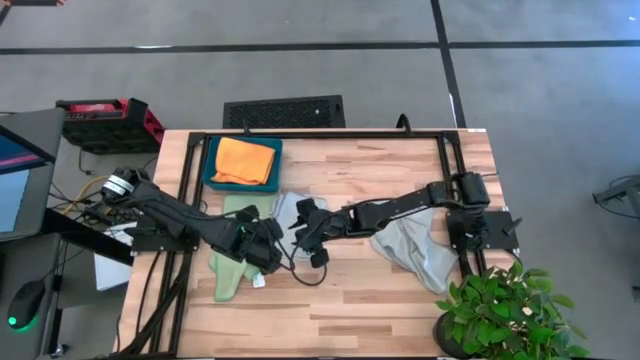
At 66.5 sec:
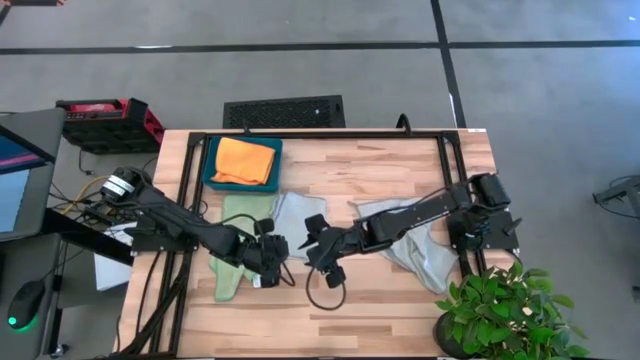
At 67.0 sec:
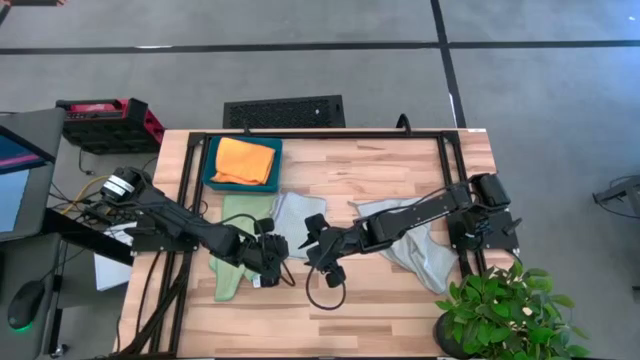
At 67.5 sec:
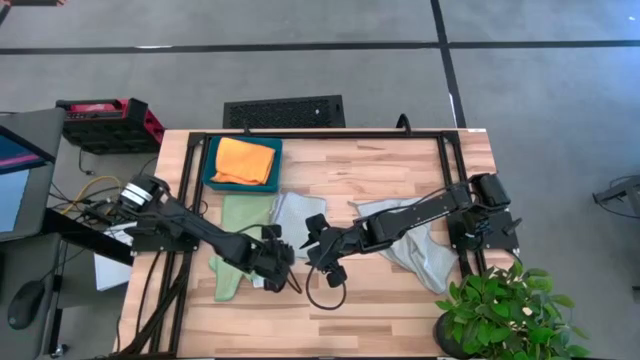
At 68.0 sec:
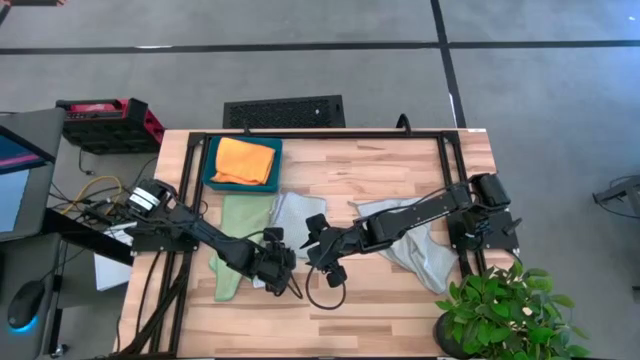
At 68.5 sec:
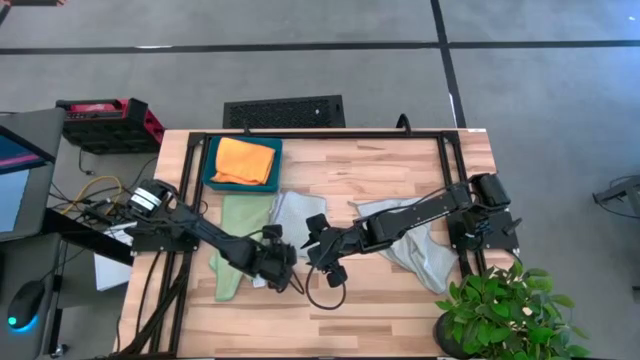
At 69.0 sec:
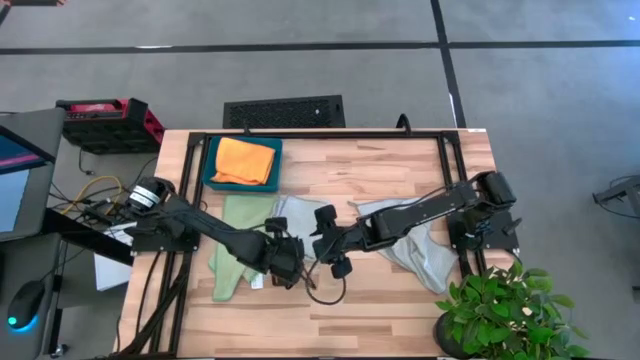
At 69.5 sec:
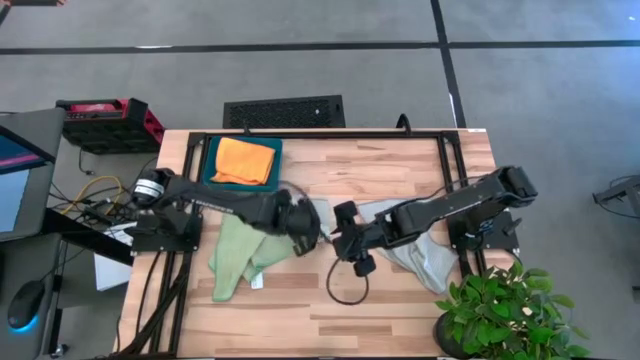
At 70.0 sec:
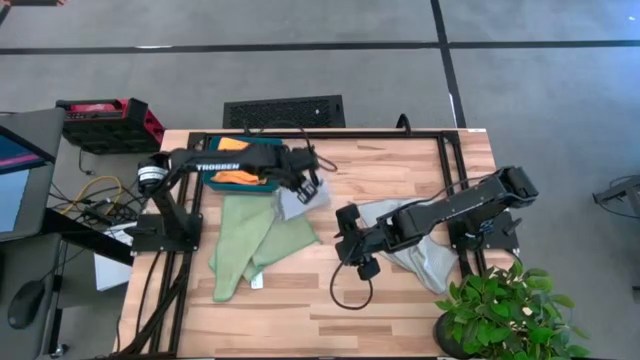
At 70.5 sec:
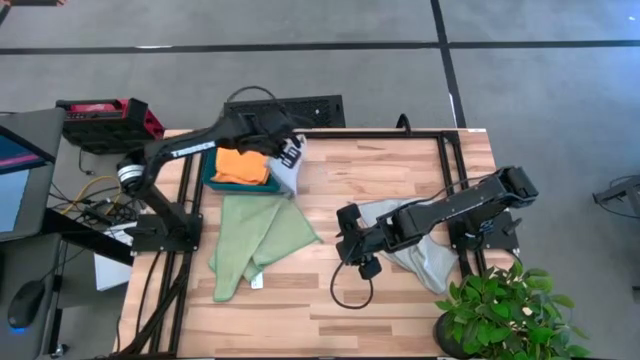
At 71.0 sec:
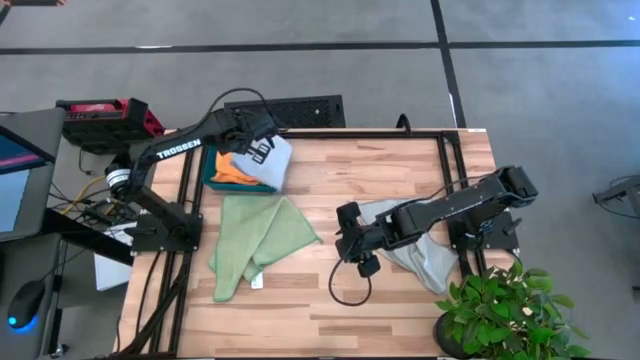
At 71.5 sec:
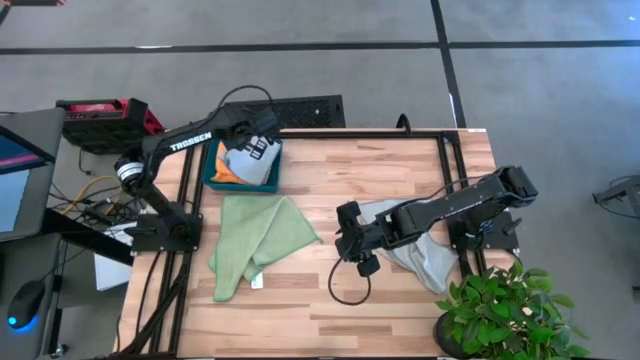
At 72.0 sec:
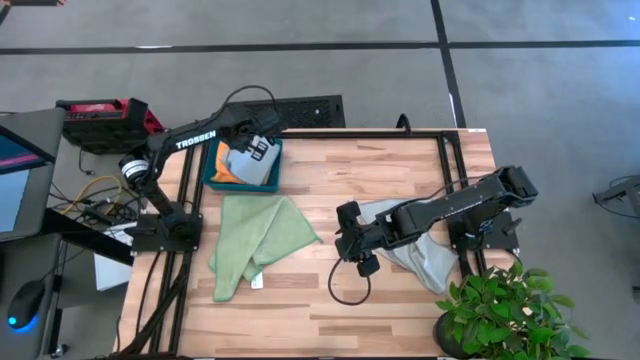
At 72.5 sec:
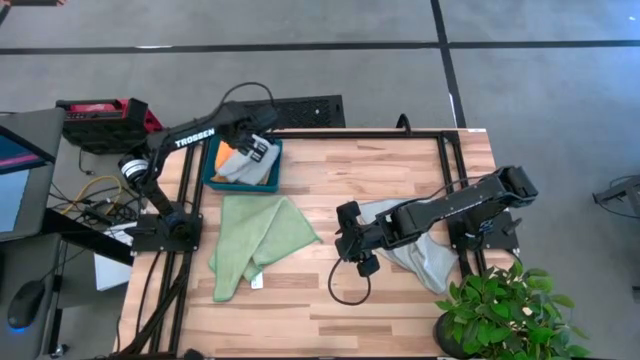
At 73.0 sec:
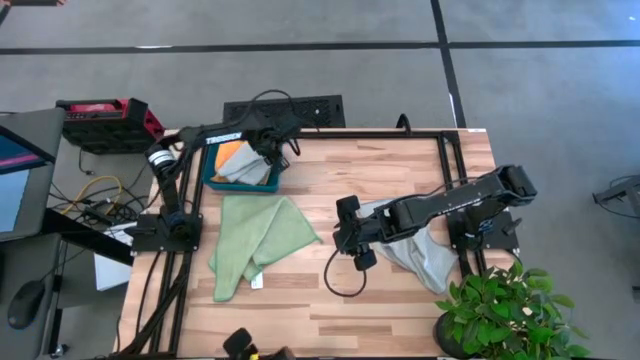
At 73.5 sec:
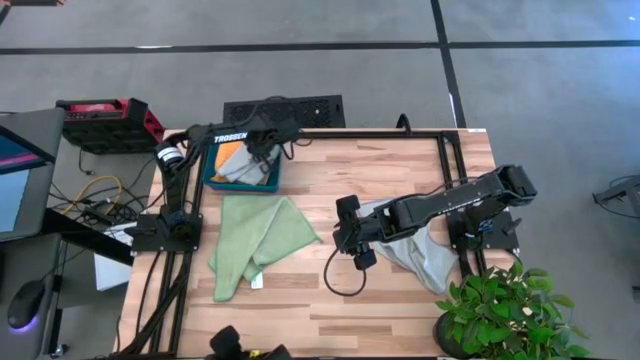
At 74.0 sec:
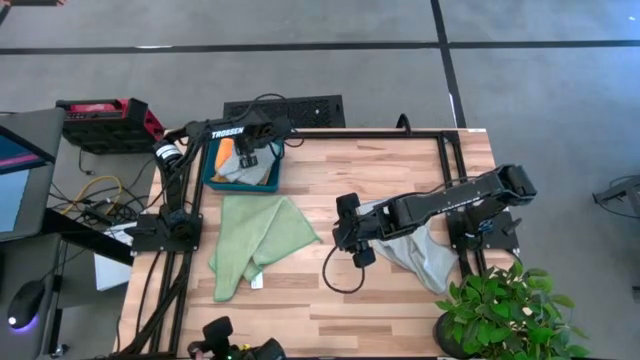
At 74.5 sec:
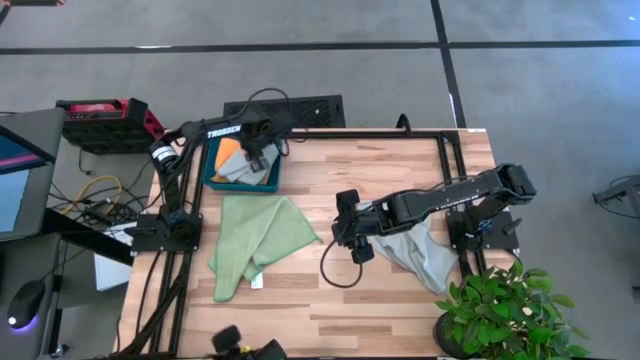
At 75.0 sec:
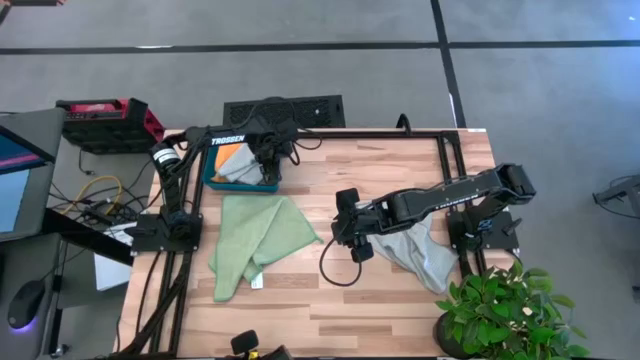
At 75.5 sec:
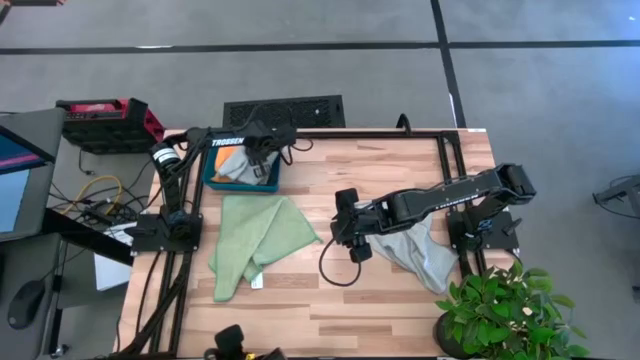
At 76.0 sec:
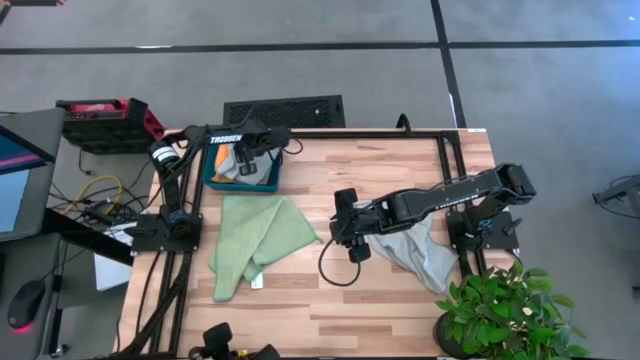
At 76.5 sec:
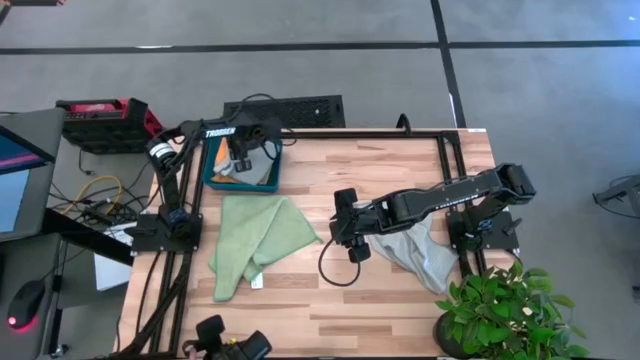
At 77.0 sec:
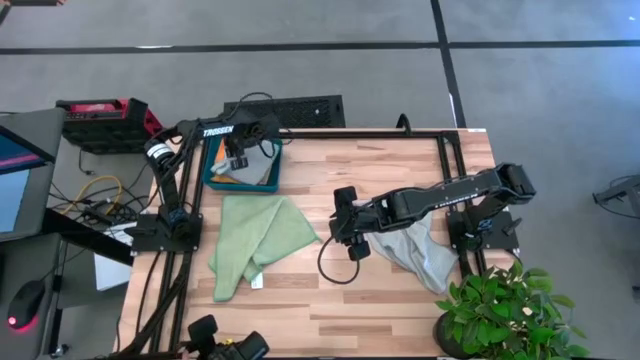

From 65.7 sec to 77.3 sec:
Task: Fold microfiber towels
Put the folded gray towel into the blue bin

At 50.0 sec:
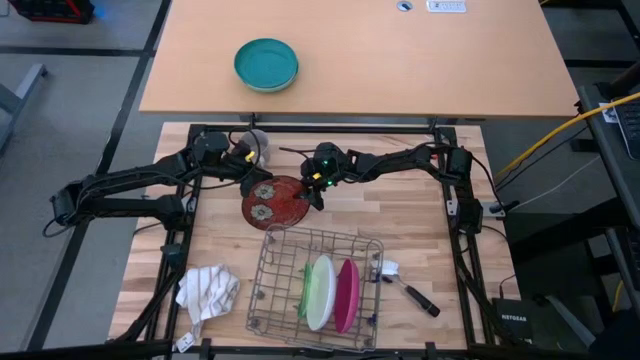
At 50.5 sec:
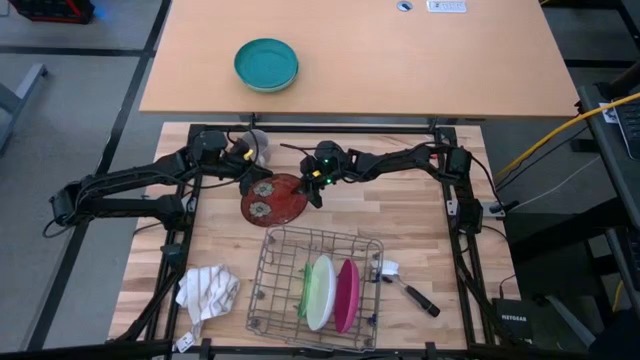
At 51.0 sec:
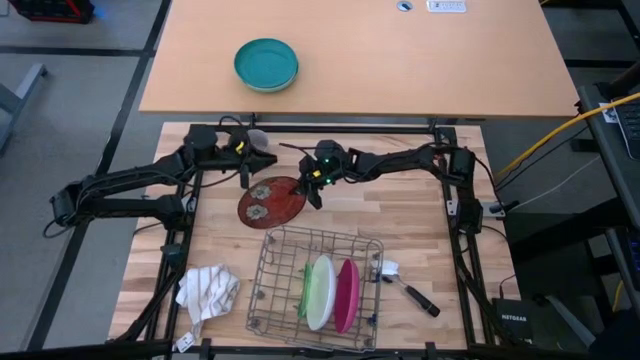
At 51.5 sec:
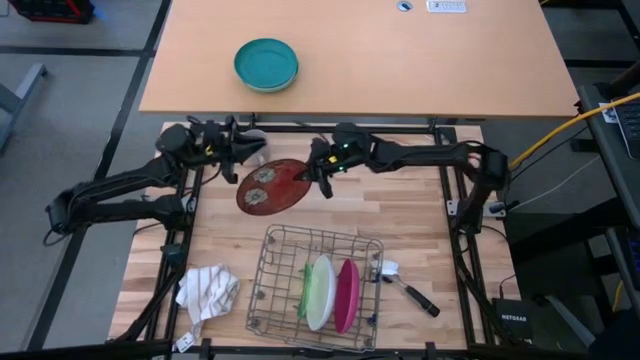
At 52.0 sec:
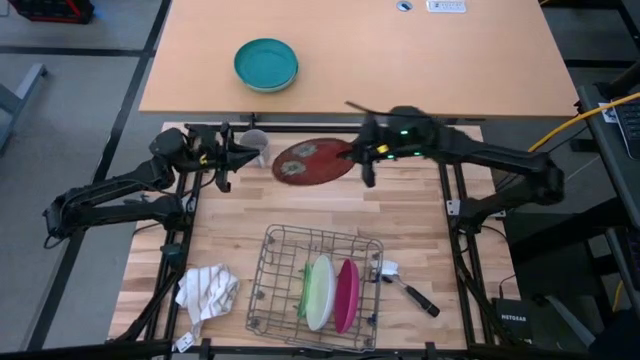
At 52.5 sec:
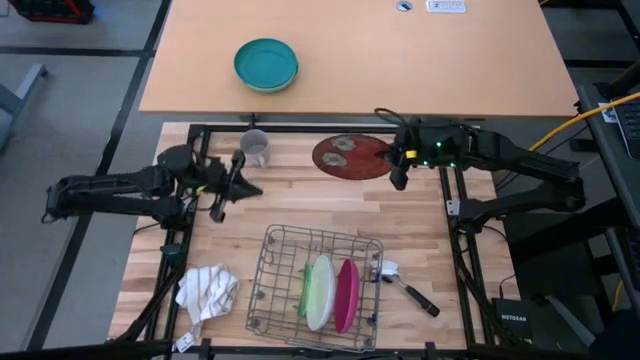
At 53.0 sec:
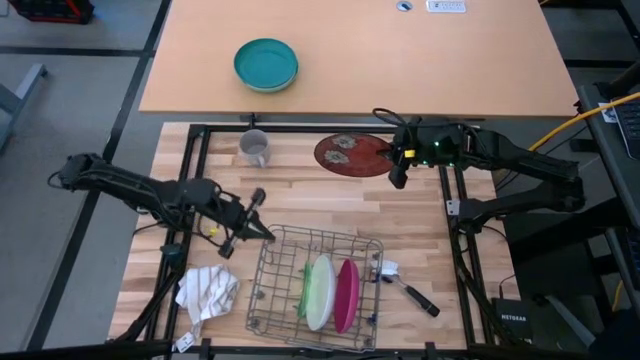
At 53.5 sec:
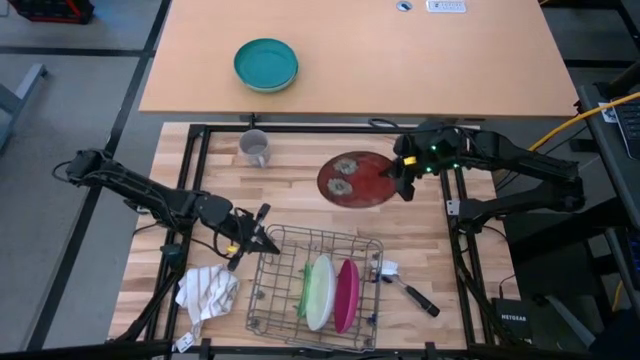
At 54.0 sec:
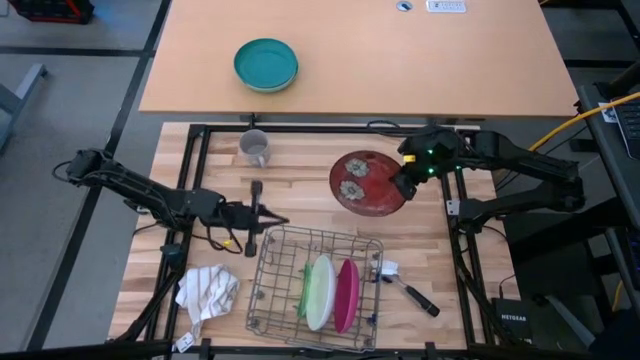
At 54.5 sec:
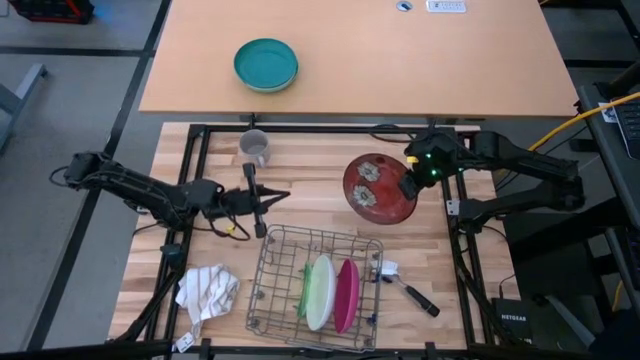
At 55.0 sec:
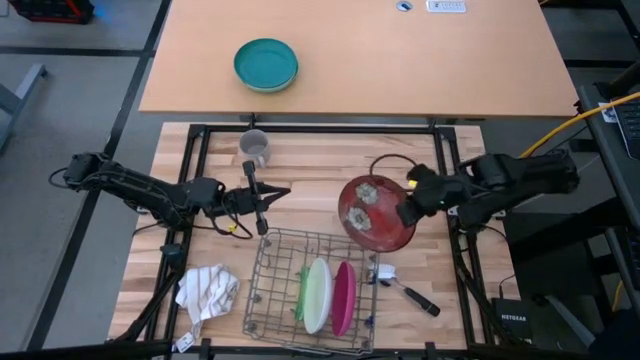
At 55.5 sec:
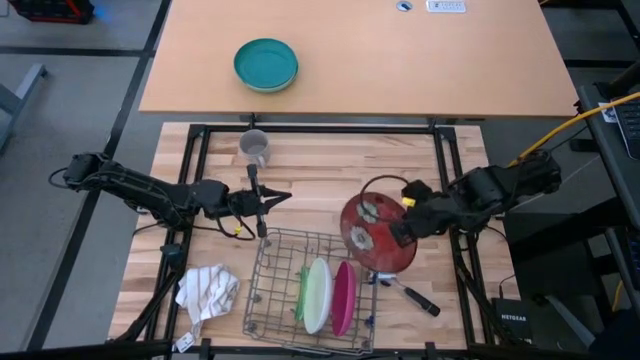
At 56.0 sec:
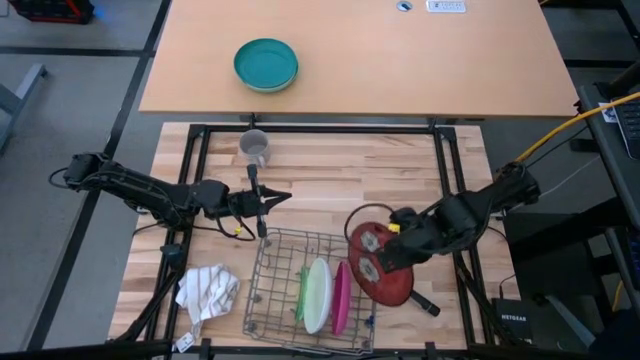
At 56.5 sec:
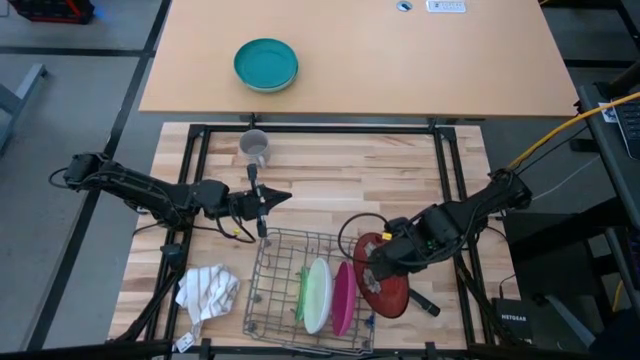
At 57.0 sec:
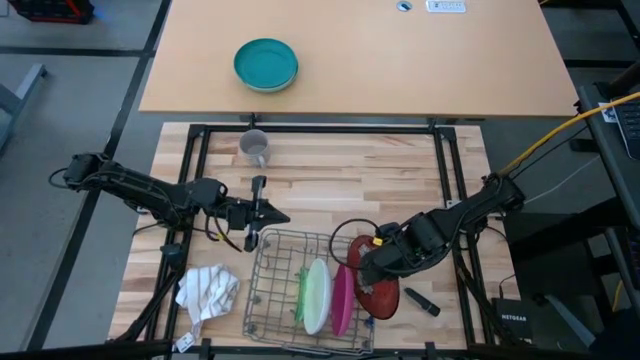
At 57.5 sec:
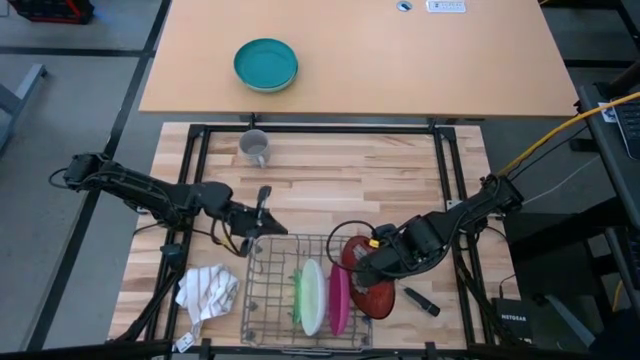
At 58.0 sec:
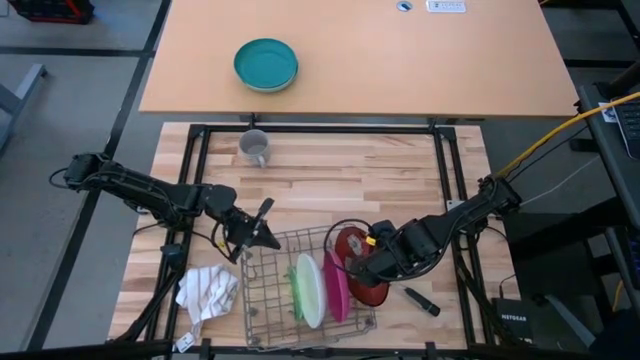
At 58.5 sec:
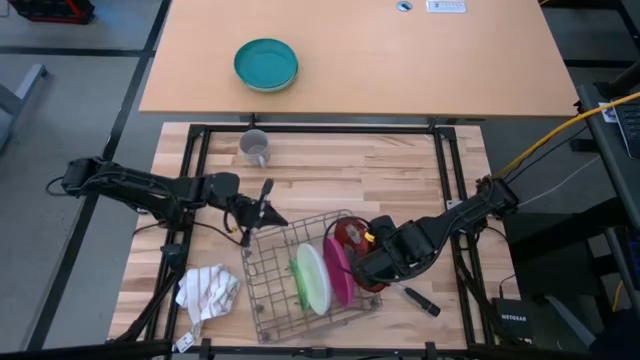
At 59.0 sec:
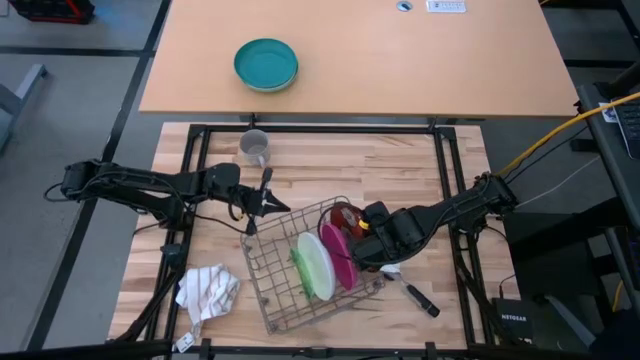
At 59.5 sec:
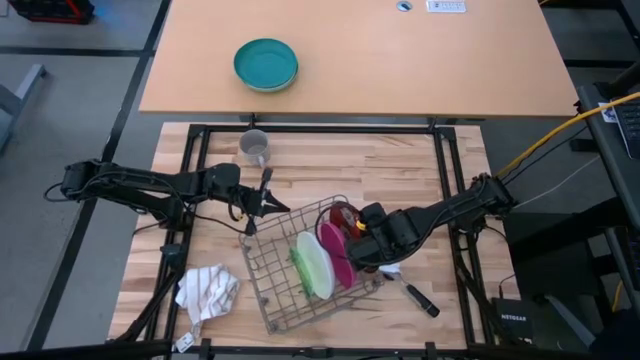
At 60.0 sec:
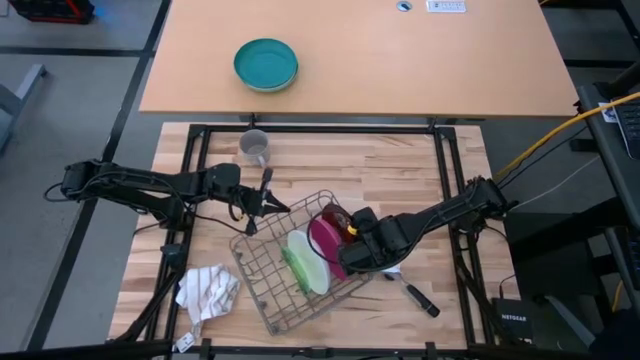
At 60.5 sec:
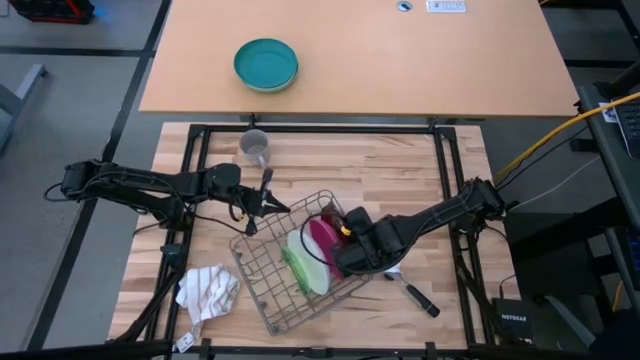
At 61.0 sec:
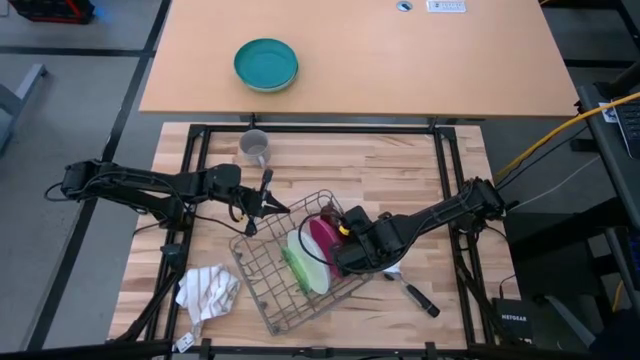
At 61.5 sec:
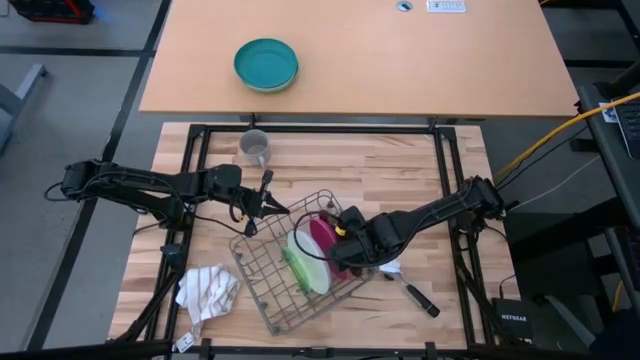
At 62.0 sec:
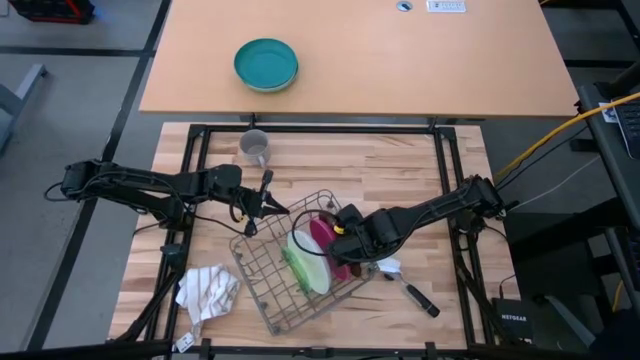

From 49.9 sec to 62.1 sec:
Task: Sort dishes
Put the red plate into the dish rack
